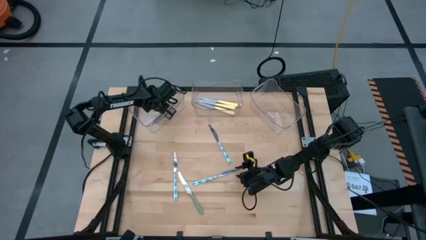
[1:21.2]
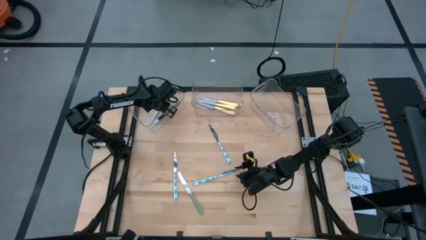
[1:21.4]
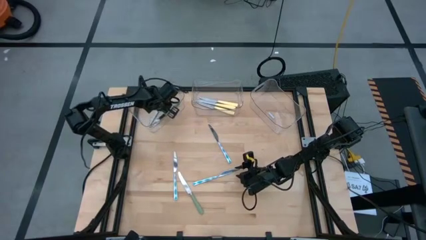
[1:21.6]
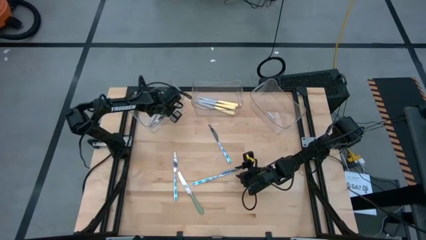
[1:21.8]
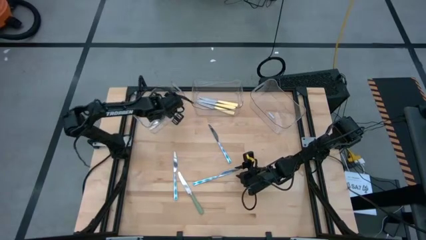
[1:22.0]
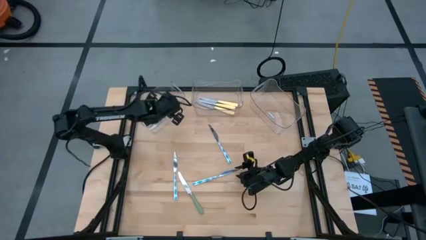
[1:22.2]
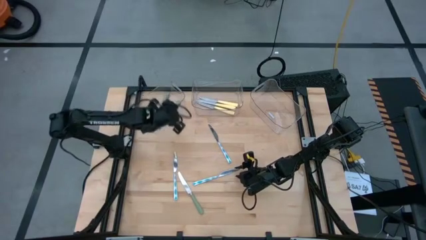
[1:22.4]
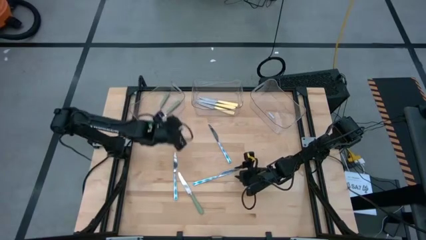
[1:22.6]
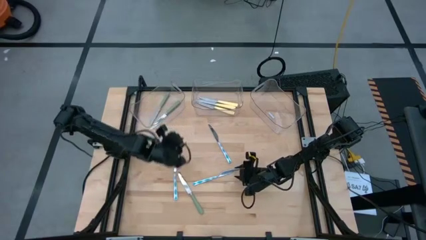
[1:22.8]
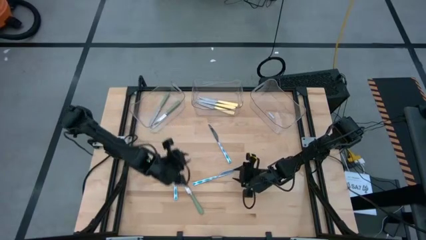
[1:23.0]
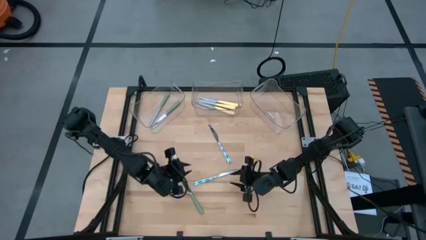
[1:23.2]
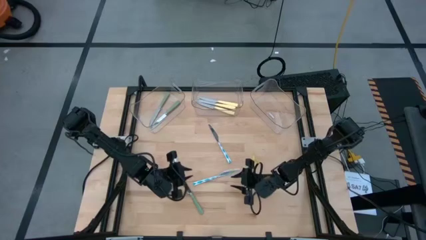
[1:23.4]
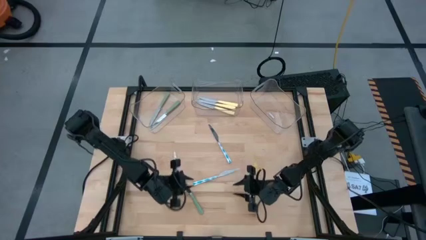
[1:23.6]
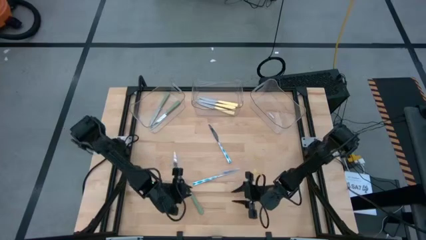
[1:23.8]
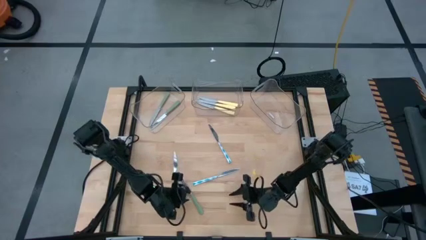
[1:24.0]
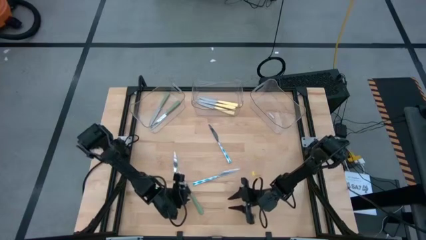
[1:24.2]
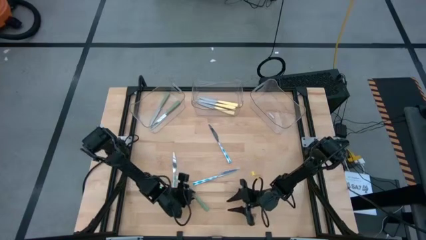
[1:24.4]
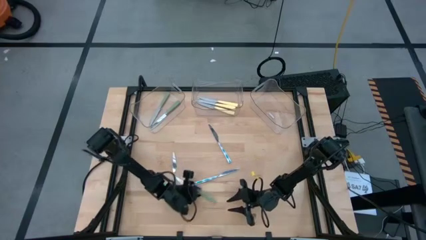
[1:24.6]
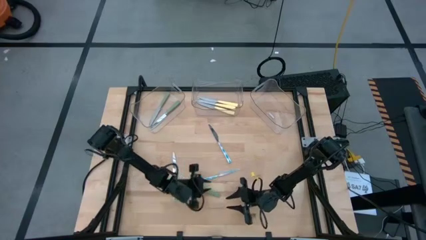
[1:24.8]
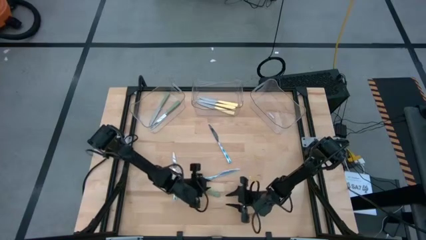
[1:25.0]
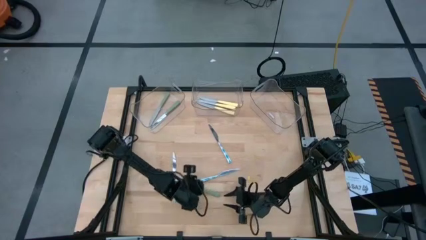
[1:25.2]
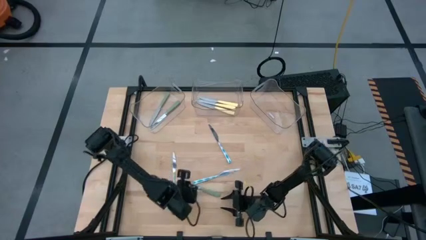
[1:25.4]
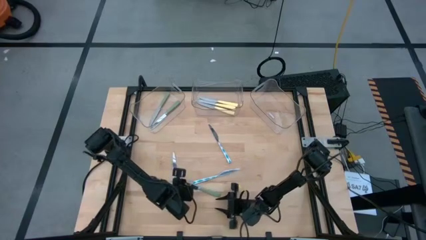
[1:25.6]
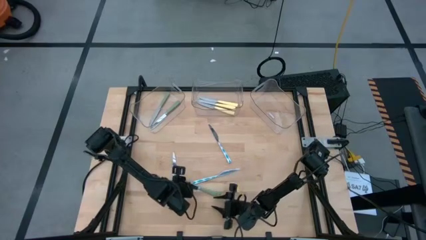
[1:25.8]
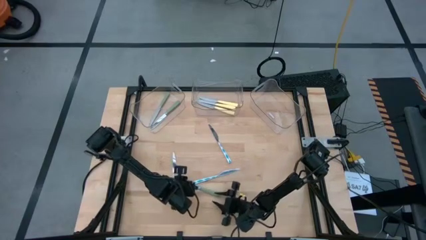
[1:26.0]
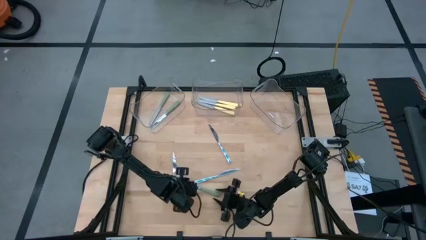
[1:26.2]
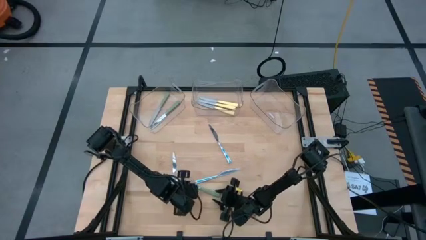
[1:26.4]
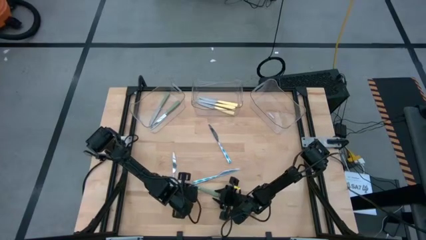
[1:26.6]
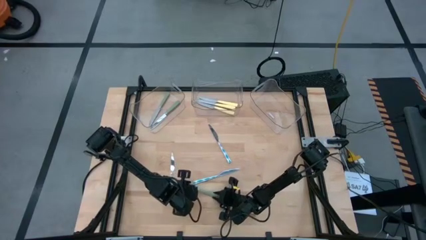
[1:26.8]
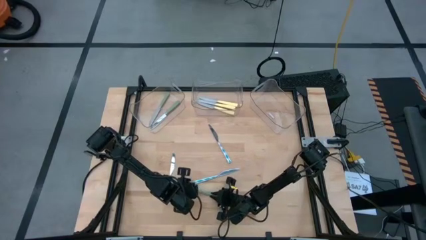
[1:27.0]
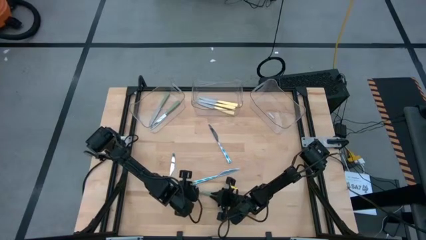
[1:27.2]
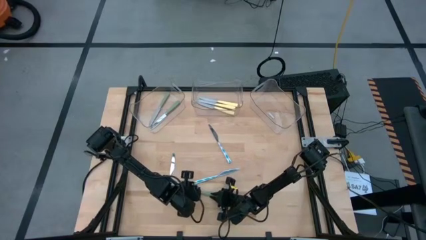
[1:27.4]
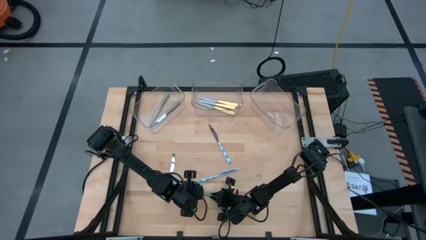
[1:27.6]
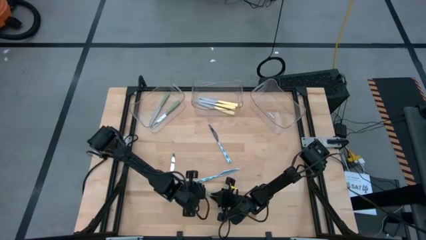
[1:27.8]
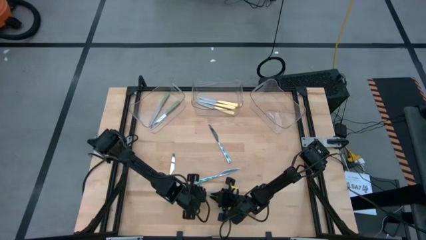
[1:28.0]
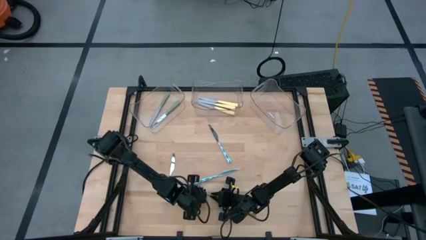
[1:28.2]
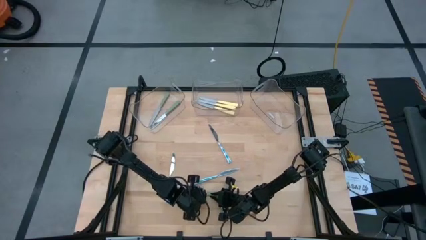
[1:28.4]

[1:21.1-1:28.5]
Task: Sort silverware by color (type)
Put the green table knife into the left transparent bin

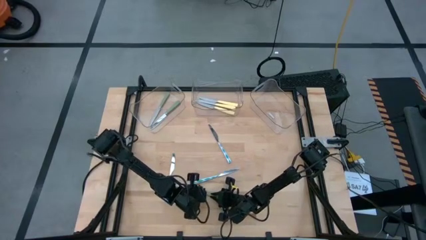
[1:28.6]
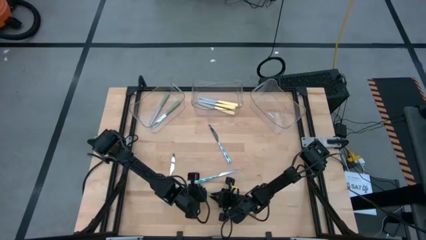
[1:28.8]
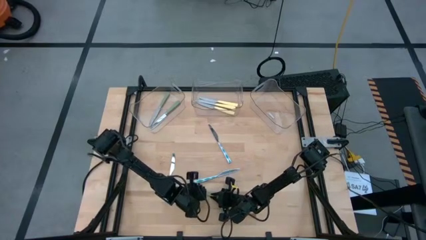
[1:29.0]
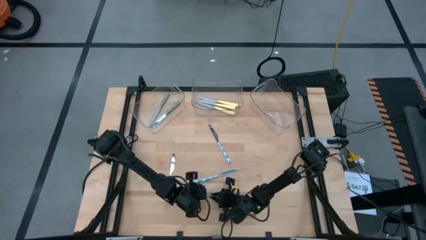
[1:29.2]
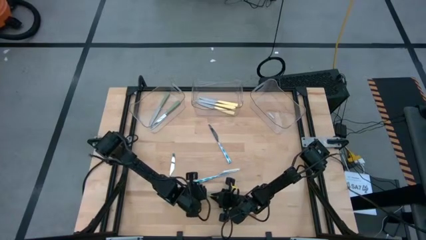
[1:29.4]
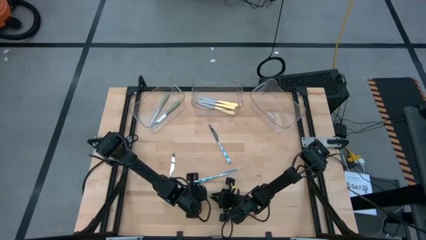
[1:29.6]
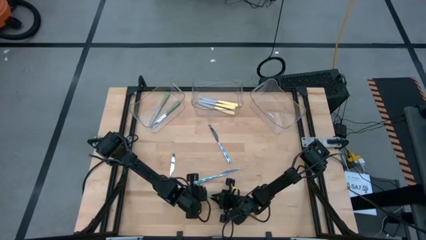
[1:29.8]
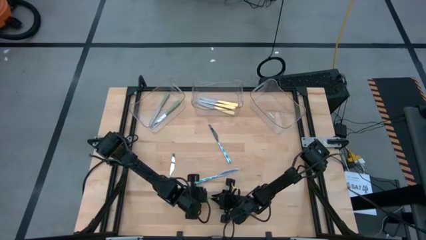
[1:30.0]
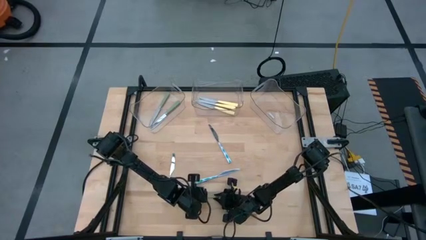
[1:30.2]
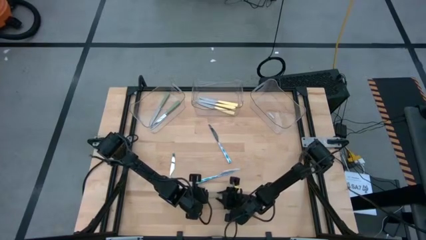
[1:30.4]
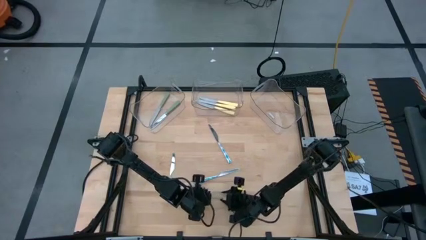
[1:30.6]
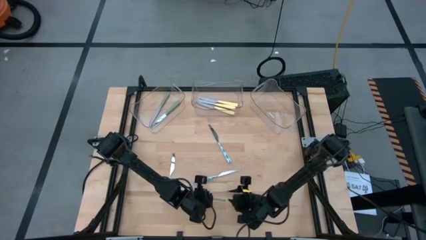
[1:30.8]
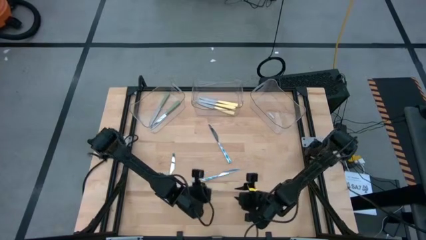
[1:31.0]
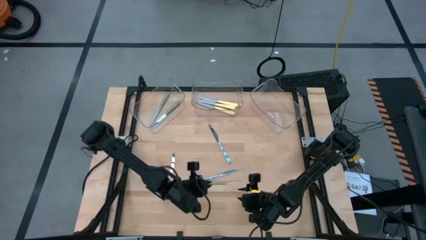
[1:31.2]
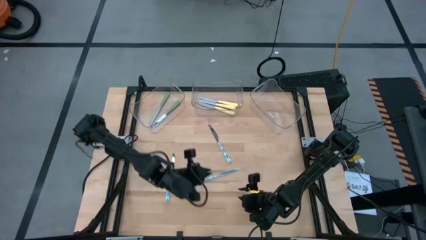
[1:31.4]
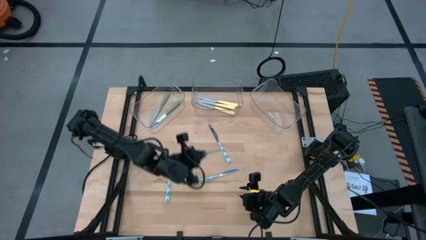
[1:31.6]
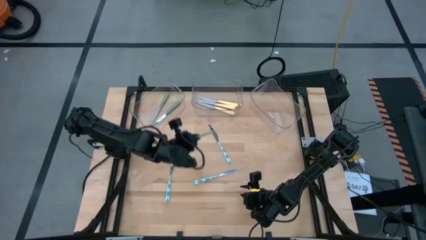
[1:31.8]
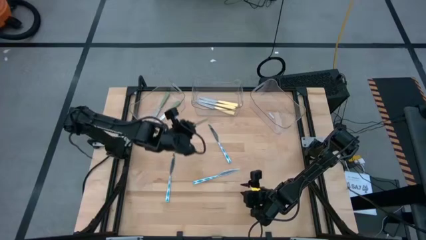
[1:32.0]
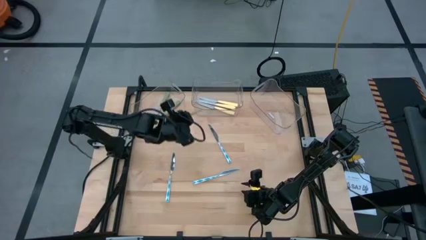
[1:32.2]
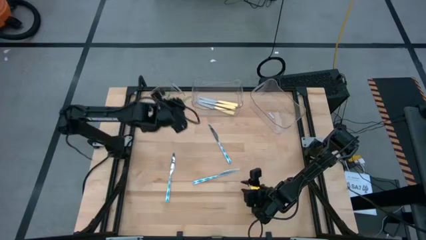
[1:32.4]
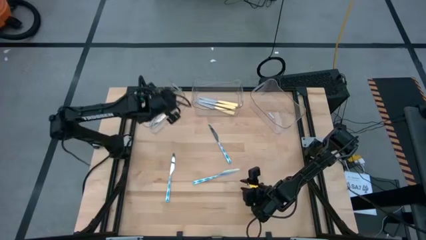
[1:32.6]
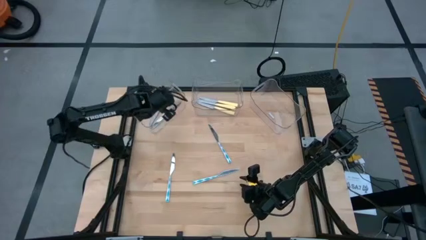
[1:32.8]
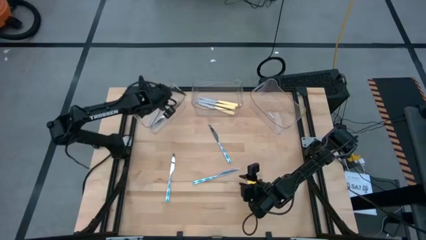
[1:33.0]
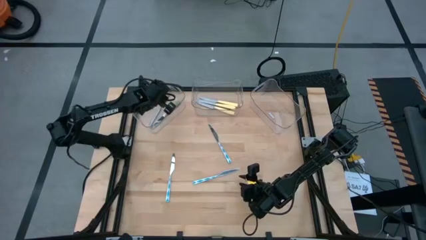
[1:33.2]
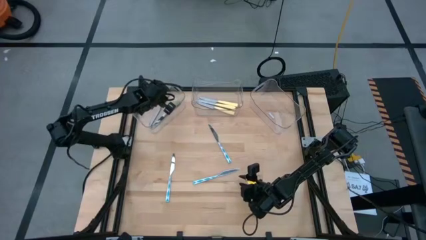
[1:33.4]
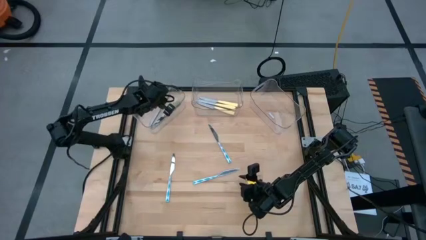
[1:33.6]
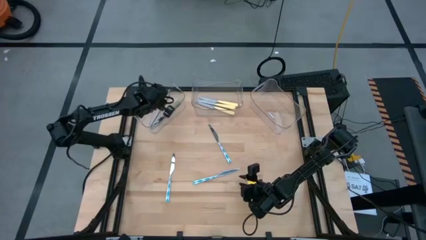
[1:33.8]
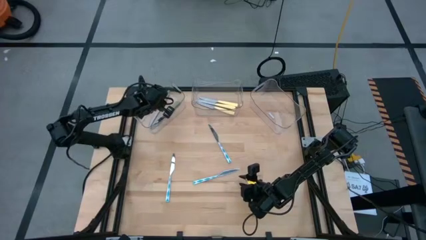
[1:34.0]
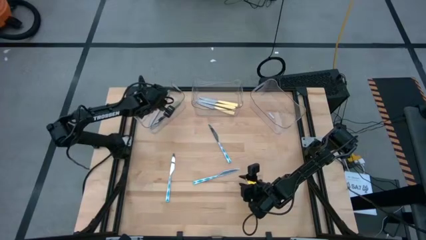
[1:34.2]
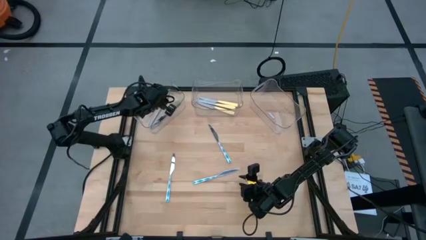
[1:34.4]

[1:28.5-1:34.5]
Put the green table knife into the left transparent bin
